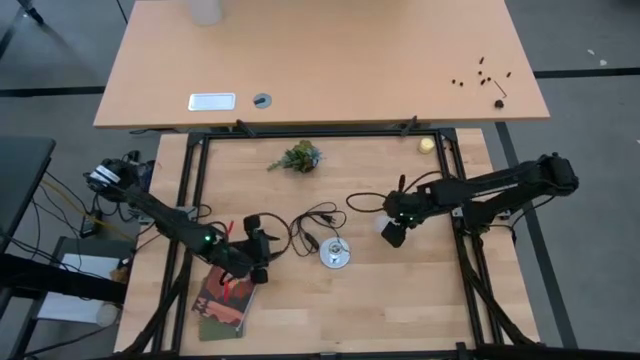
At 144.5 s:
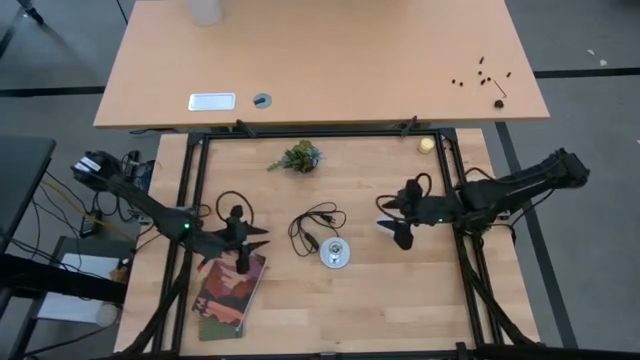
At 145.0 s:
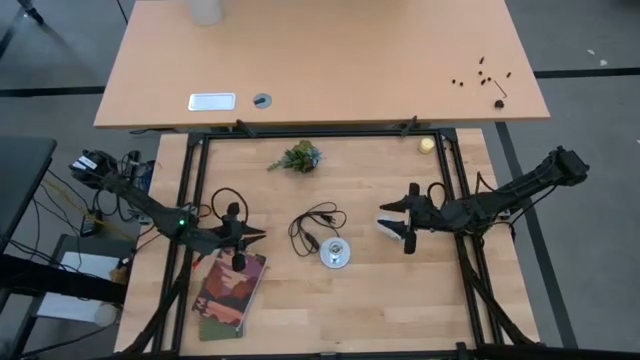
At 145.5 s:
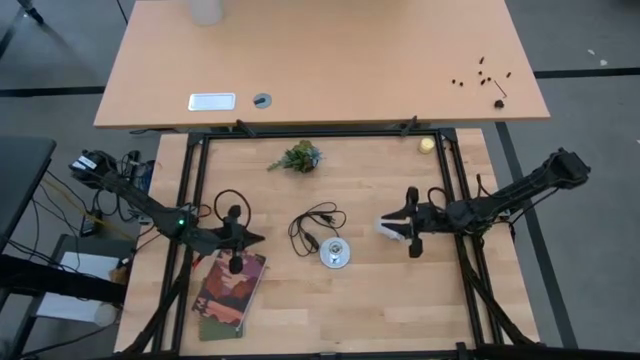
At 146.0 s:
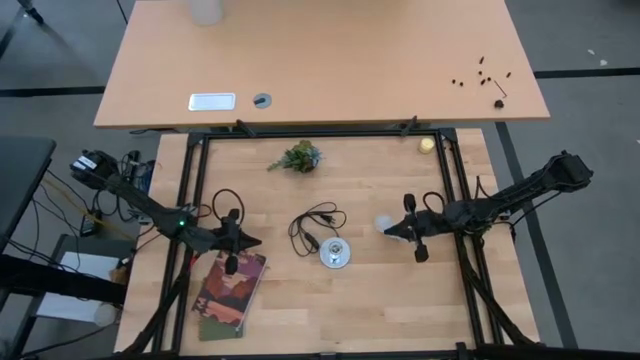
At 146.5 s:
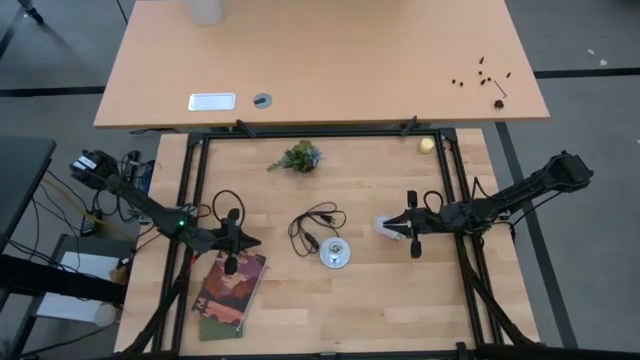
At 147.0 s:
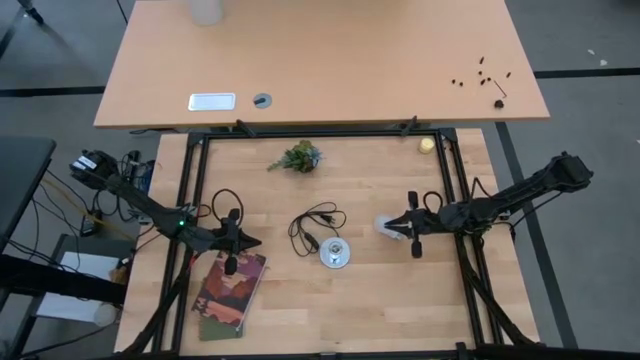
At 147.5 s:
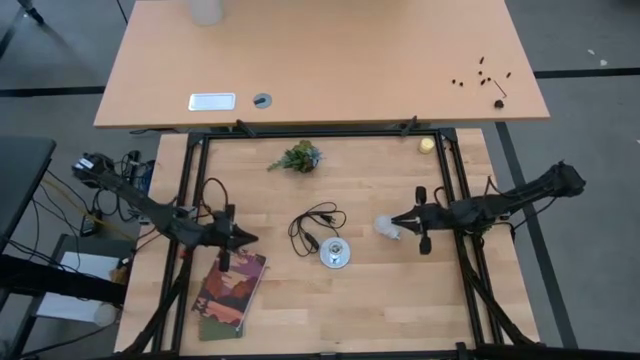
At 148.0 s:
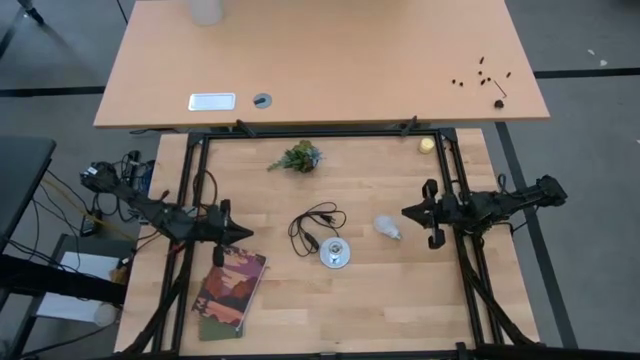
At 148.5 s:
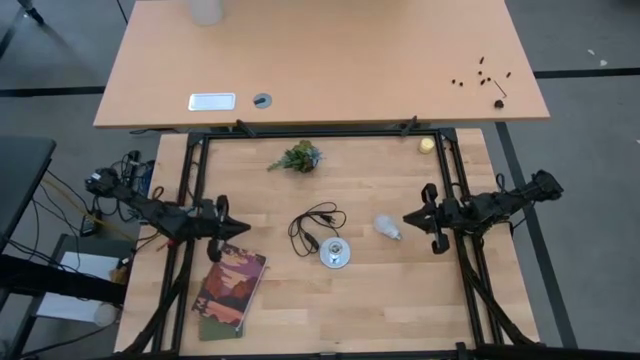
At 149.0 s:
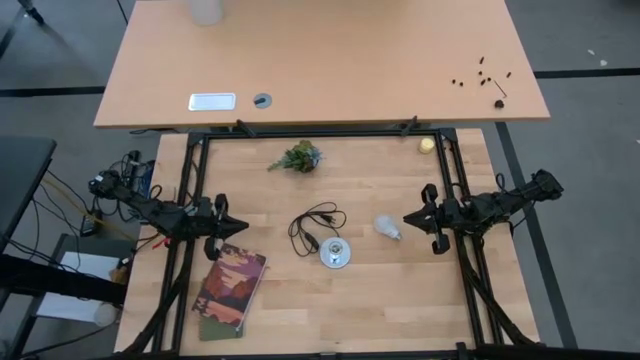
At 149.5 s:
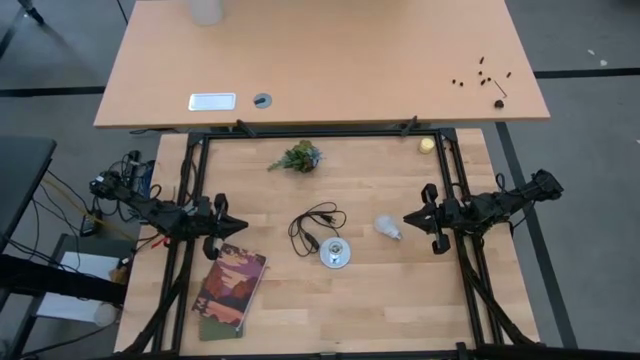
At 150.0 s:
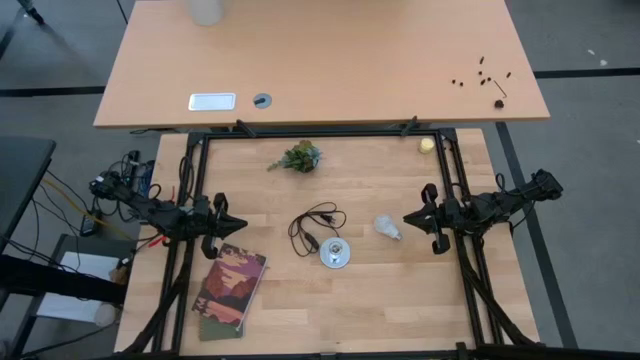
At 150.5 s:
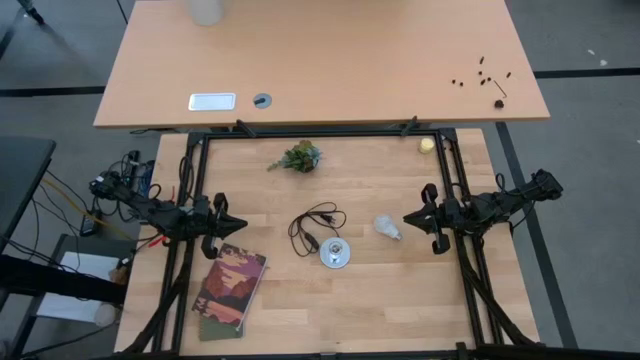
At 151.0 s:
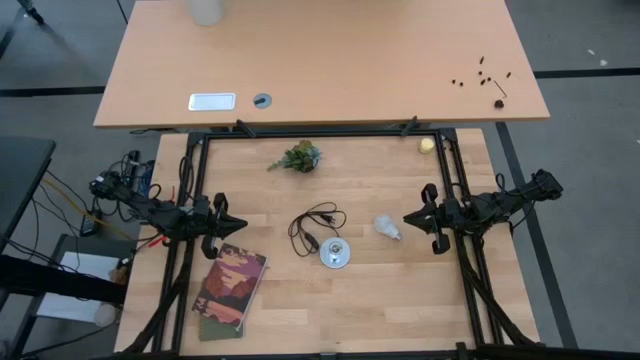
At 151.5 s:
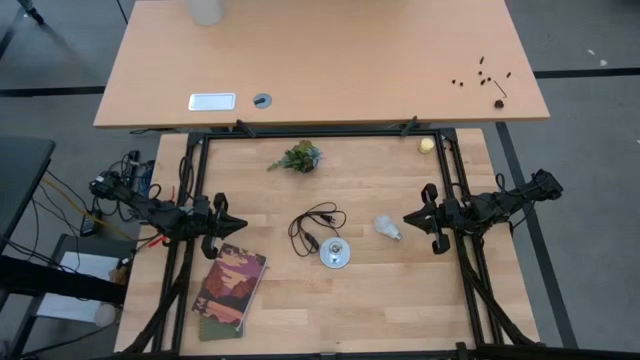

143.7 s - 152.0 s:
Task: Screw lightbulb
Return to Home Position

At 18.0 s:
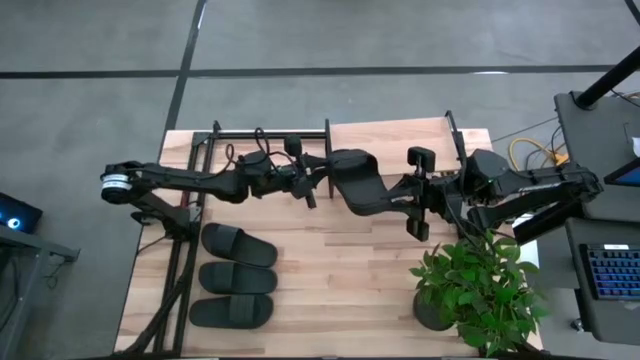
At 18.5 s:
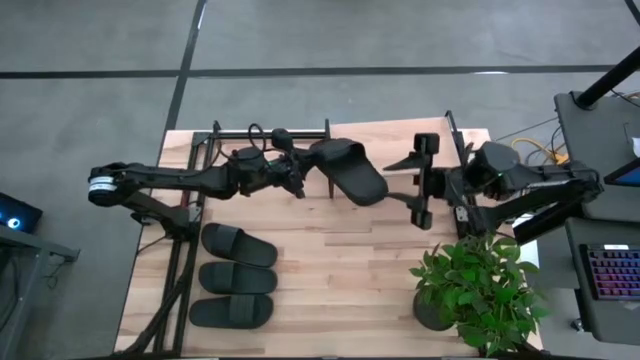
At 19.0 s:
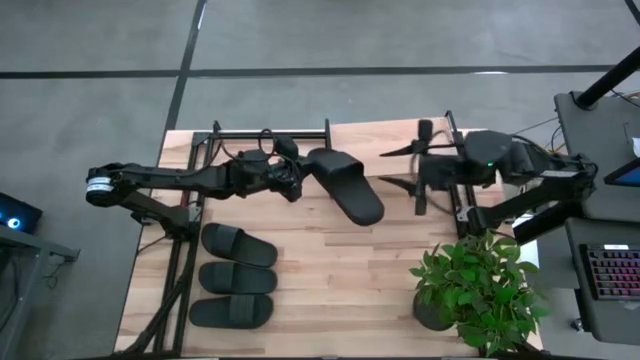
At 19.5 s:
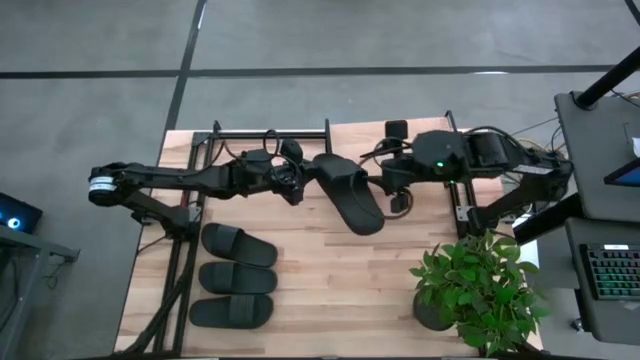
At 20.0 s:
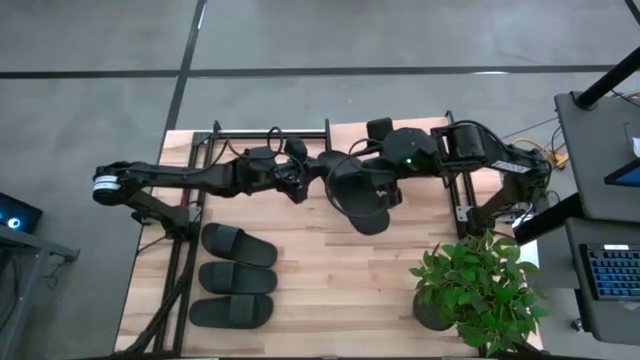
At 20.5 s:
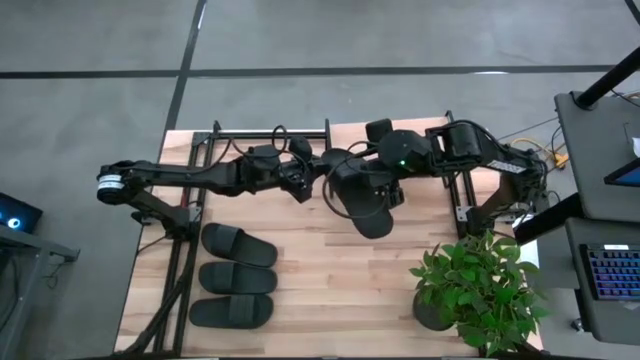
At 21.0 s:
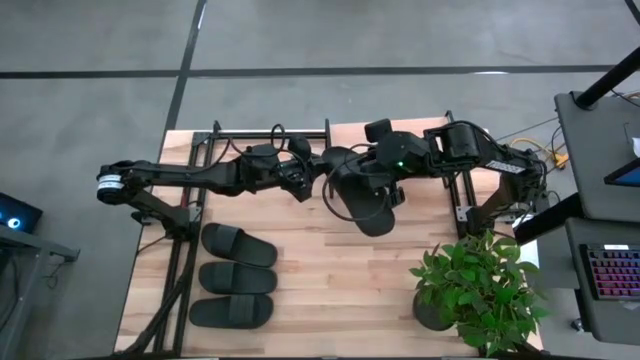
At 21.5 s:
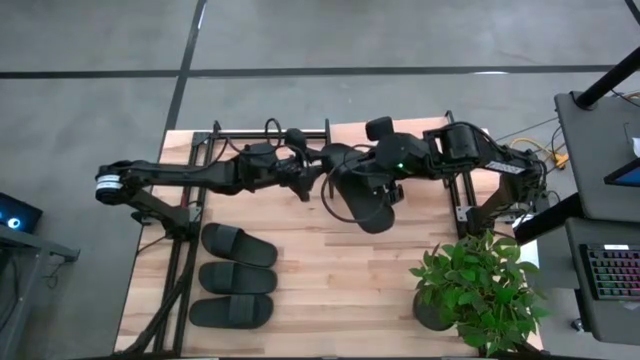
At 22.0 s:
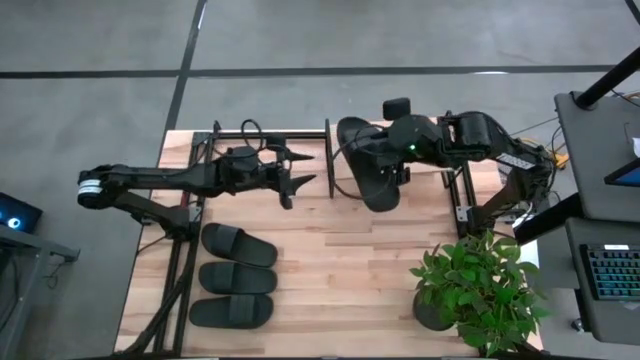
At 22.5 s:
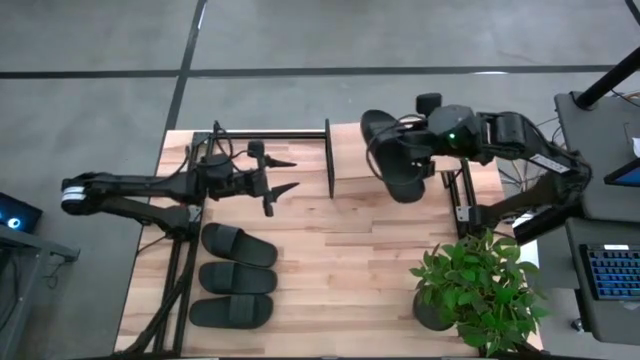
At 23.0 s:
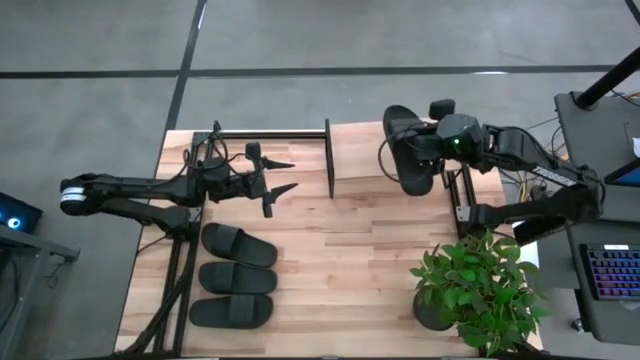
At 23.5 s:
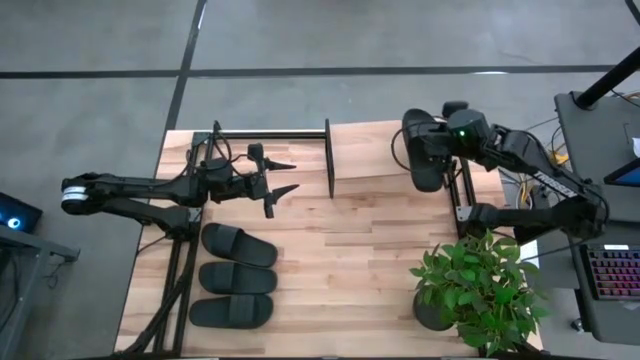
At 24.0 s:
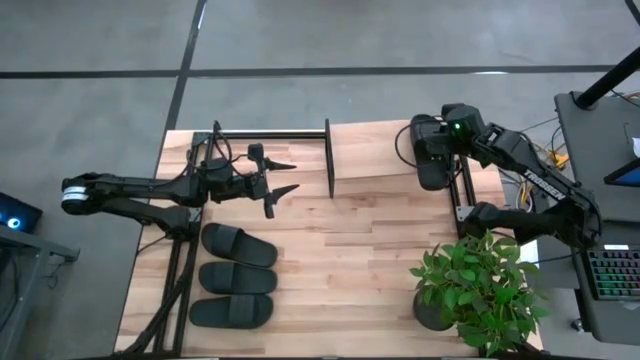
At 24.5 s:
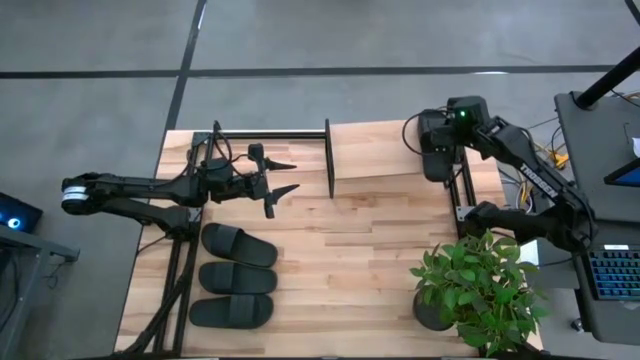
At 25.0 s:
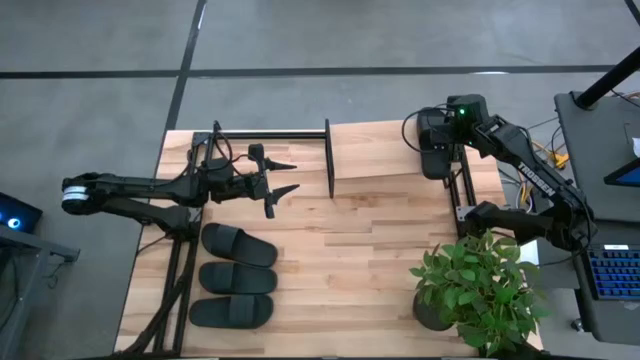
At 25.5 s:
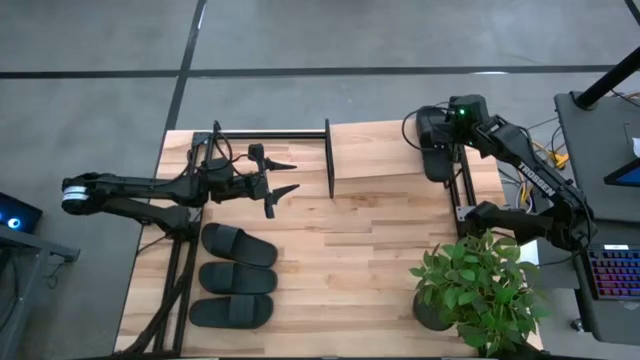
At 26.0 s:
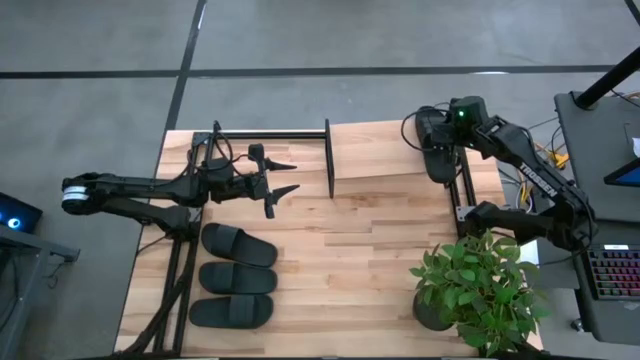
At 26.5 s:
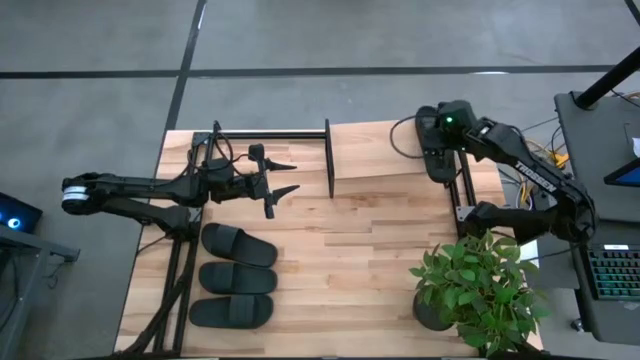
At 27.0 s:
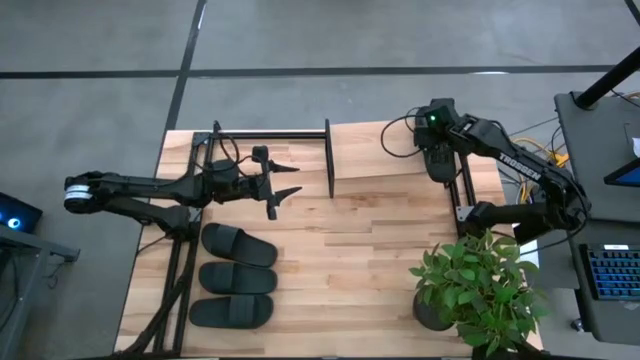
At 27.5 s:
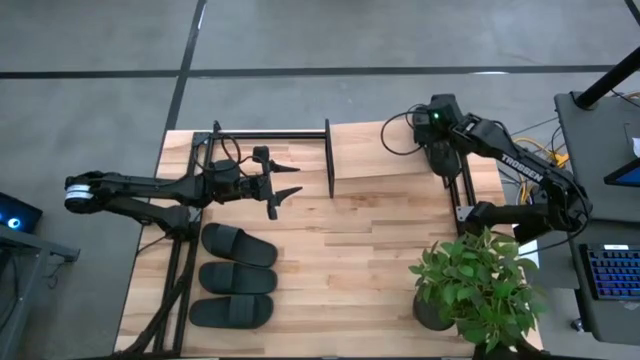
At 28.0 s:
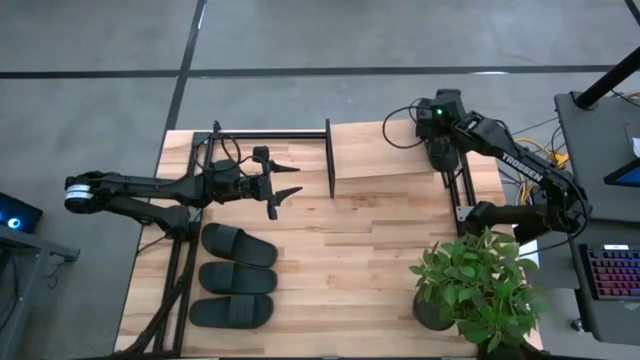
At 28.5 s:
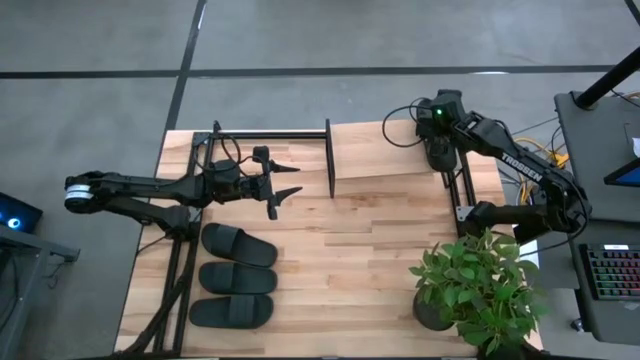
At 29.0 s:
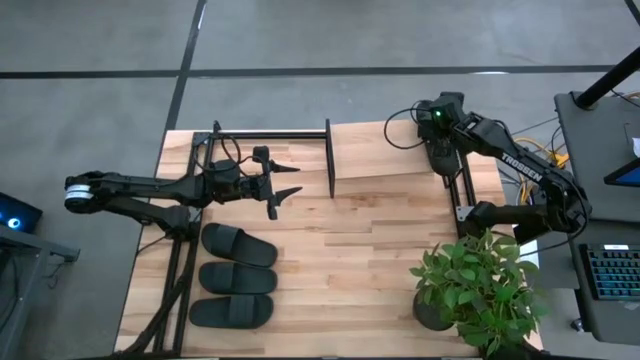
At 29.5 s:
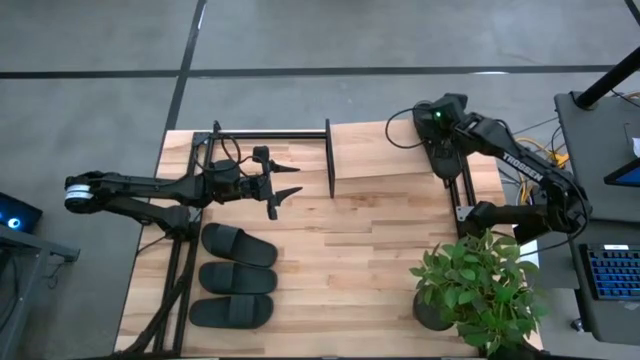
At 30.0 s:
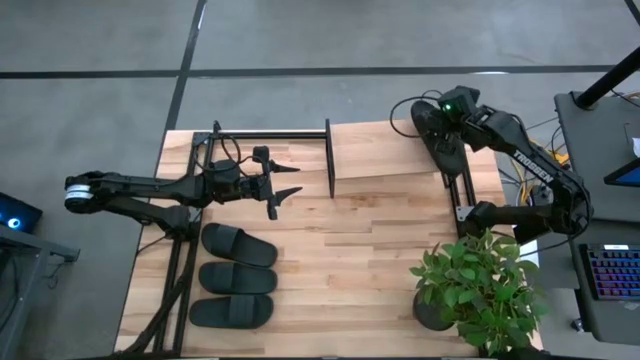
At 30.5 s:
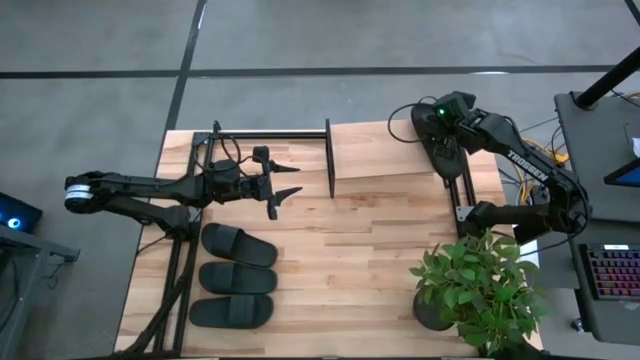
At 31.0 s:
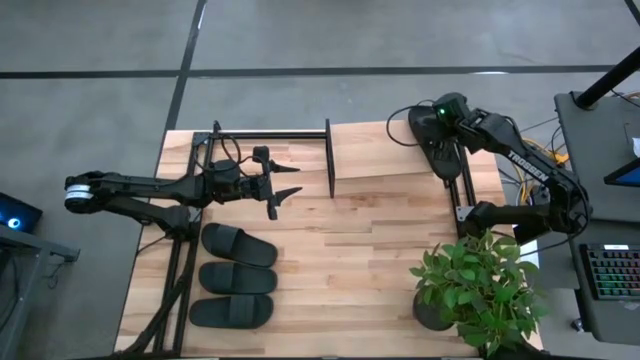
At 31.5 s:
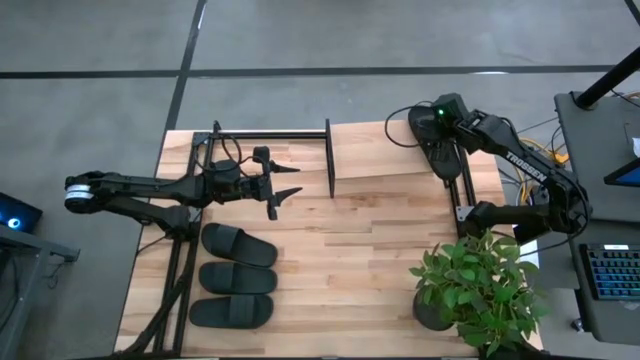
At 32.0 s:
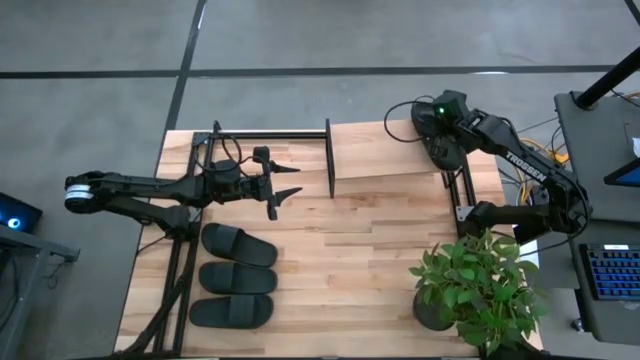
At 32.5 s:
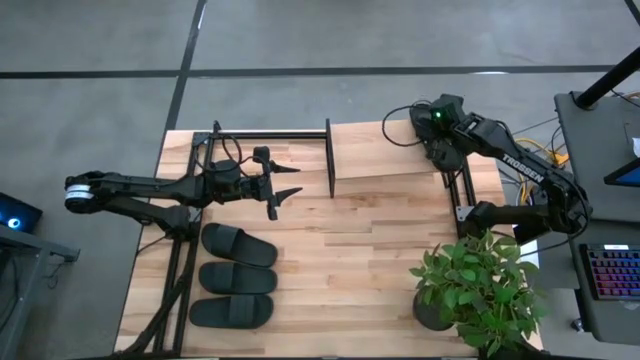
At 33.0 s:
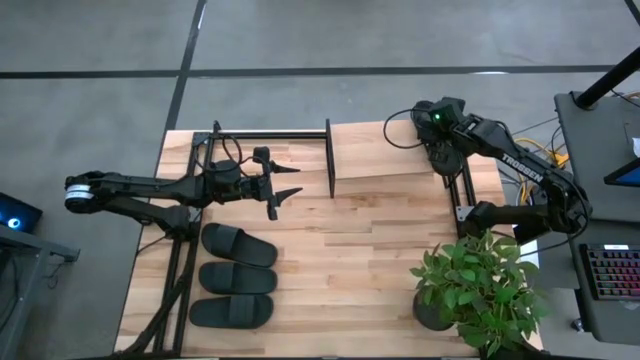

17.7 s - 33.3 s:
Task: Pick and place slides into the shelf
Put the black slipper on the shelf
